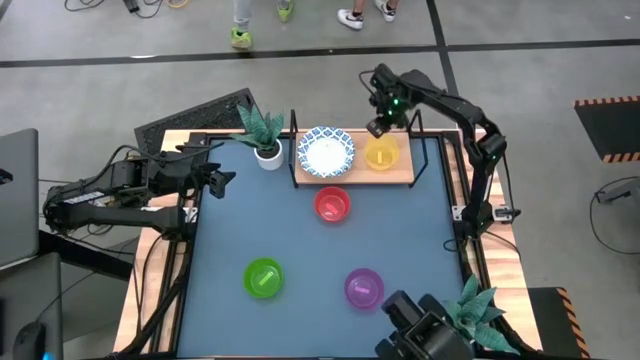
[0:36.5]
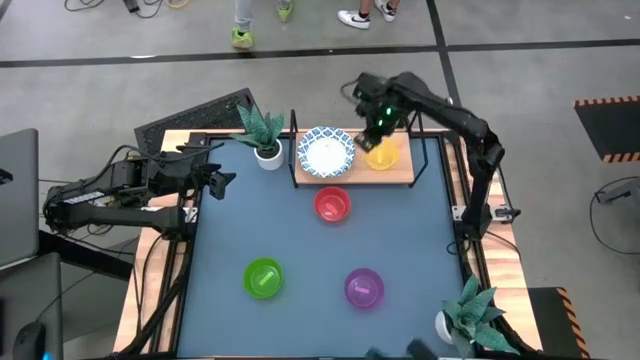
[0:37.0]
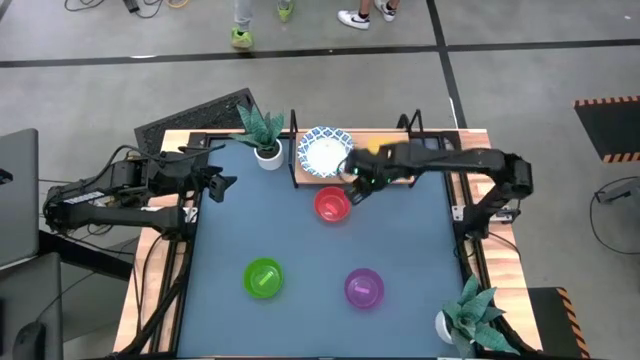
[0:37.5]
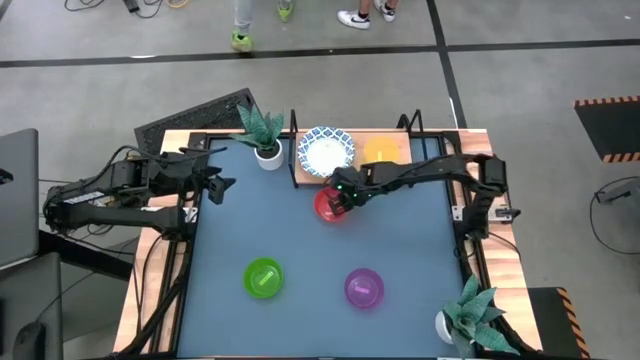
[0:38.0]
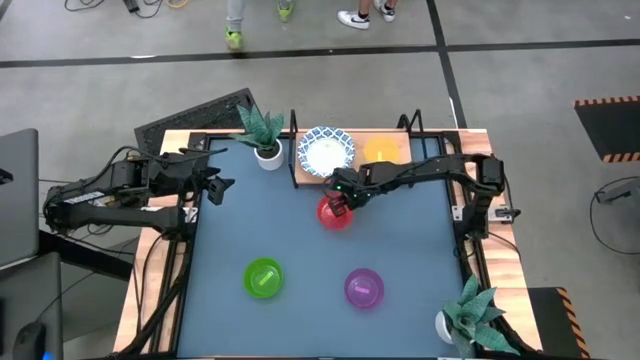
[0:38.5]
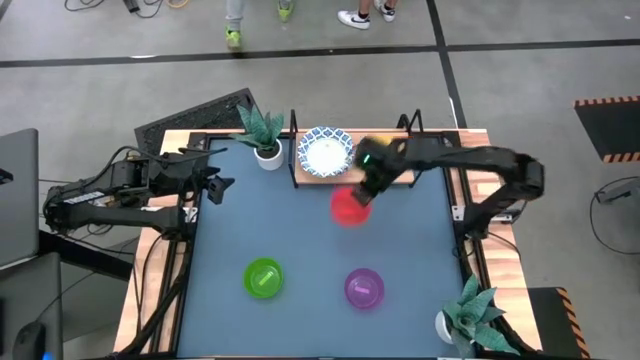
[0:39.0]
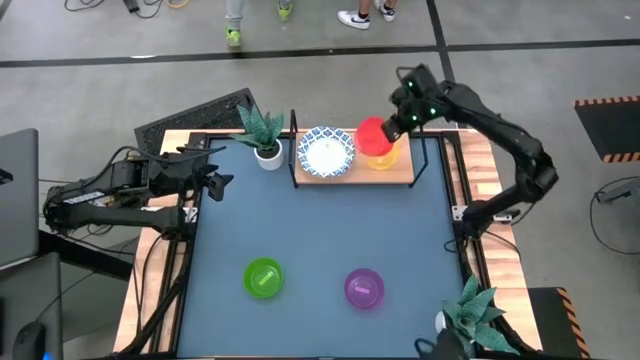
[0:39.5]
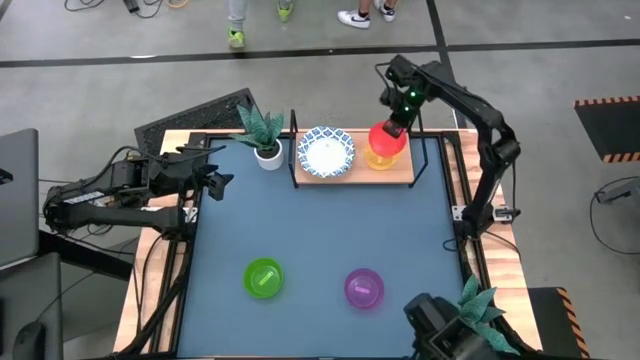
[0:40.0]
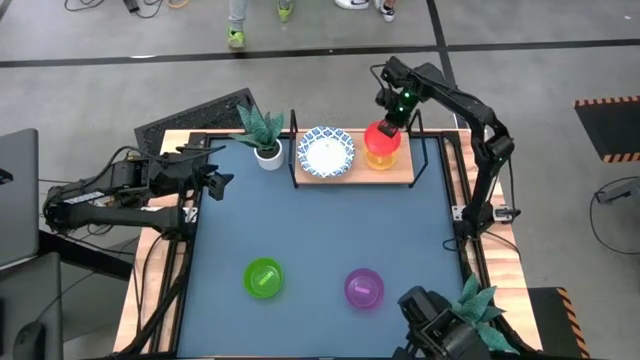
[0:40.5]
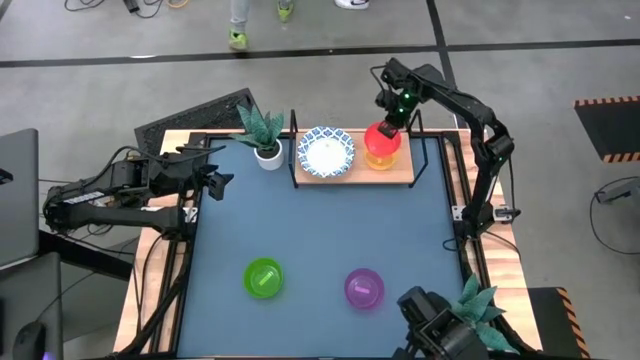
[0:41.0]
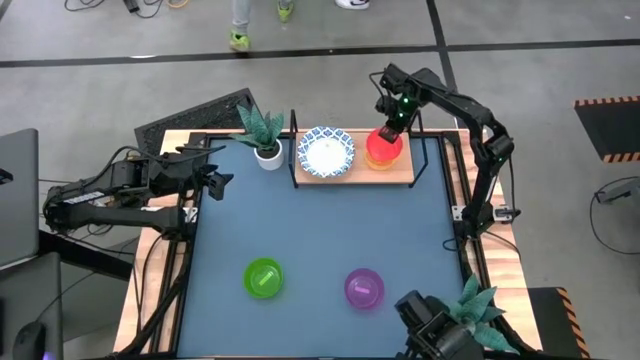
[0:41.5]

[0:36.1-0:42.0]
Task: Place and stack bowls onto a shelf
Stack the orange bowl on top of the yellow bowl on the shelf

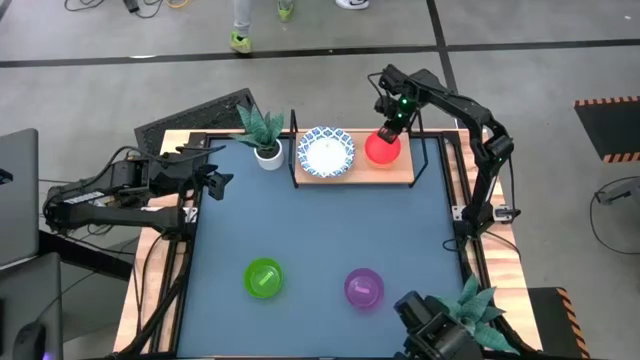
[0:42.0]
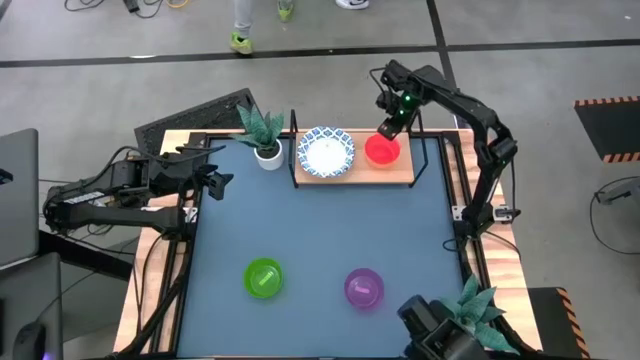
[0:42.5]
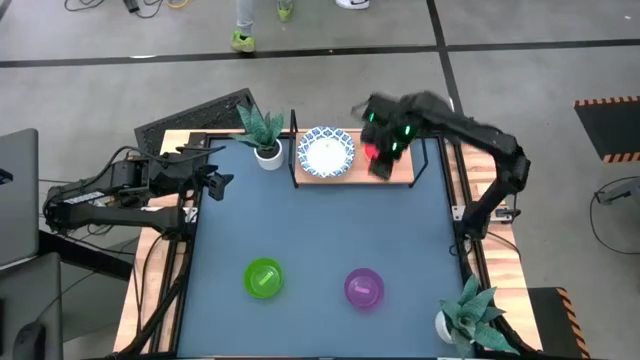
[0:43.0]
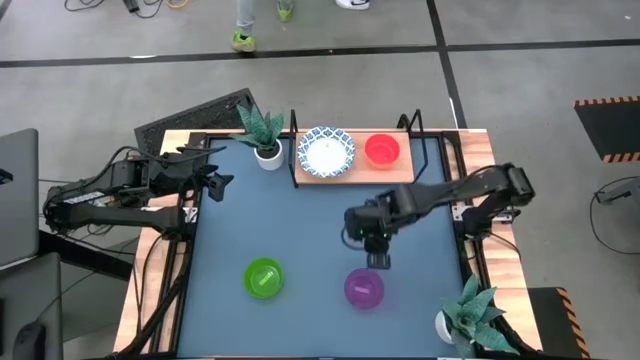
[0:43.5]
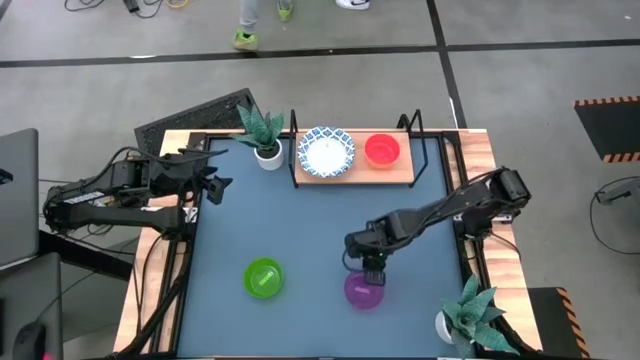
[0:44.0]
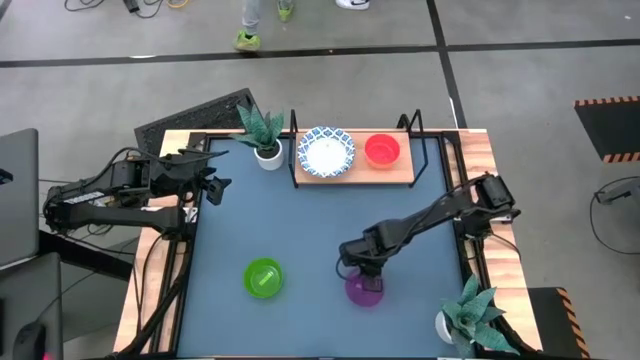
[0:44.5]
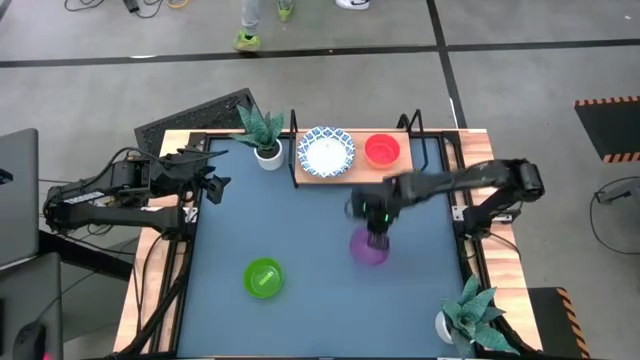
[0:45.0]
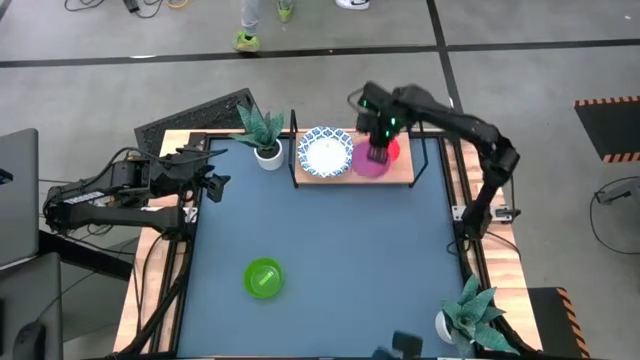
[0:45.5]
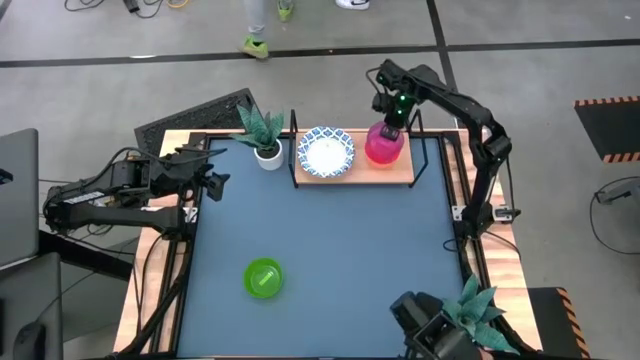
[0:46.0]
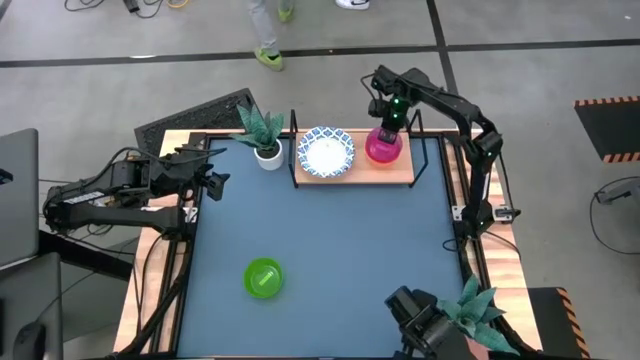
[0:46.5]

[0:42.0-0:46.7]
Stack the purple bowl on top of the orange bowl on the shelf

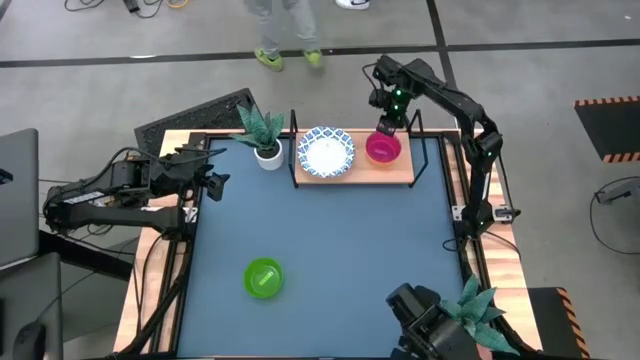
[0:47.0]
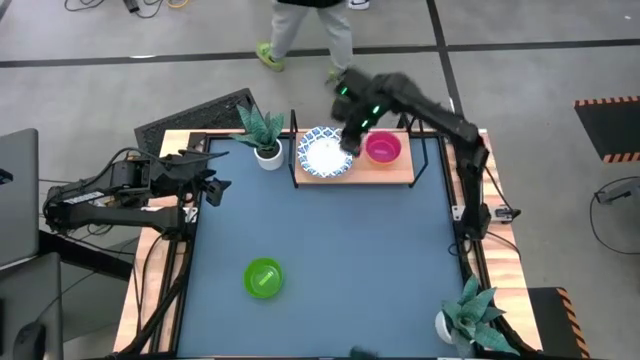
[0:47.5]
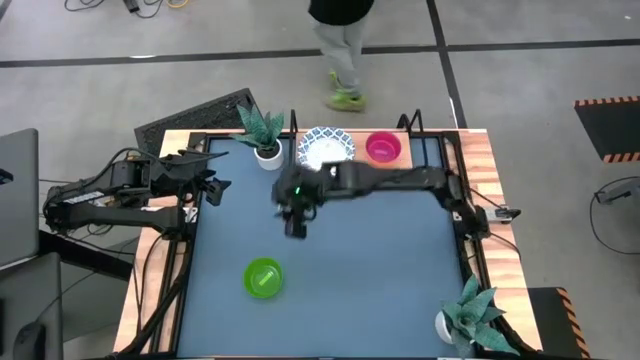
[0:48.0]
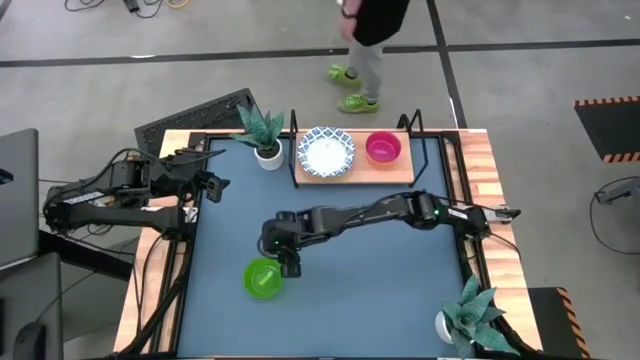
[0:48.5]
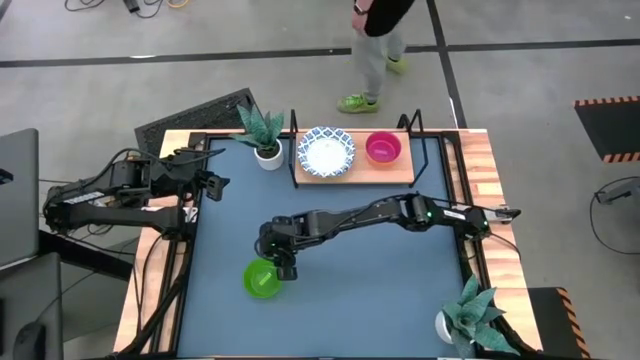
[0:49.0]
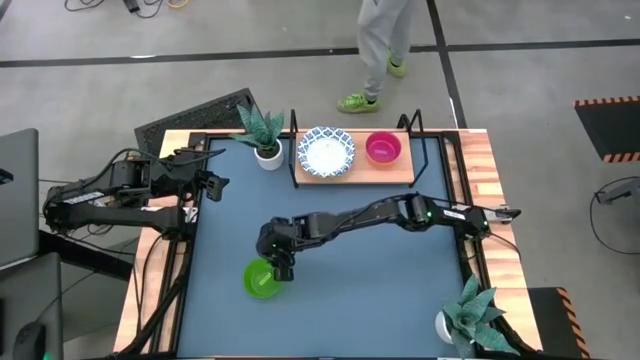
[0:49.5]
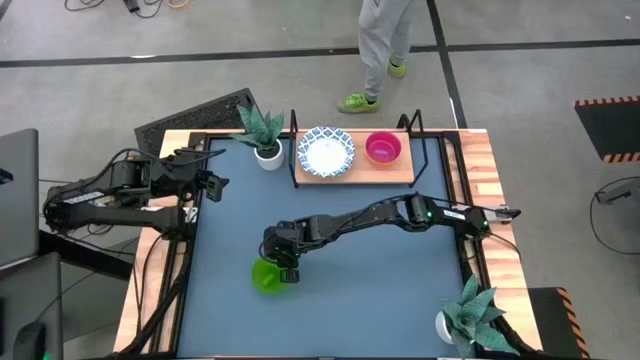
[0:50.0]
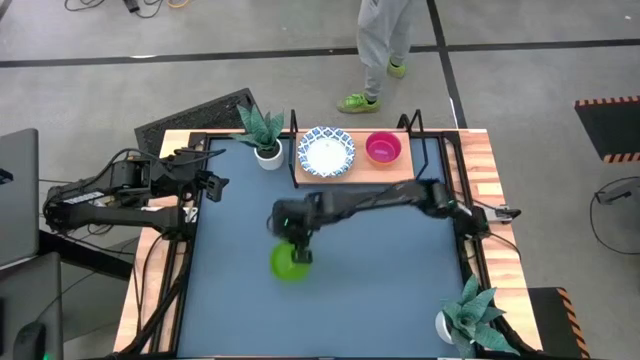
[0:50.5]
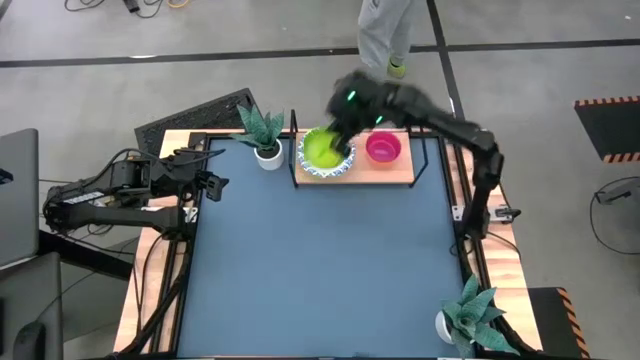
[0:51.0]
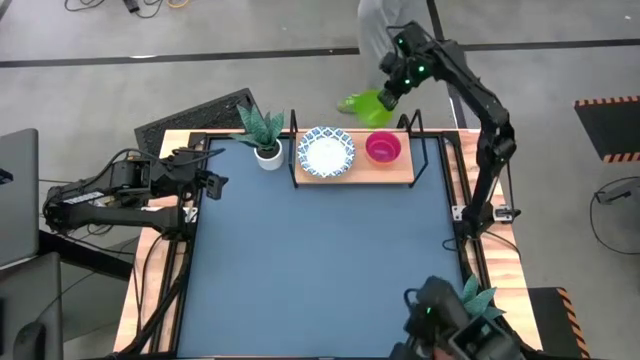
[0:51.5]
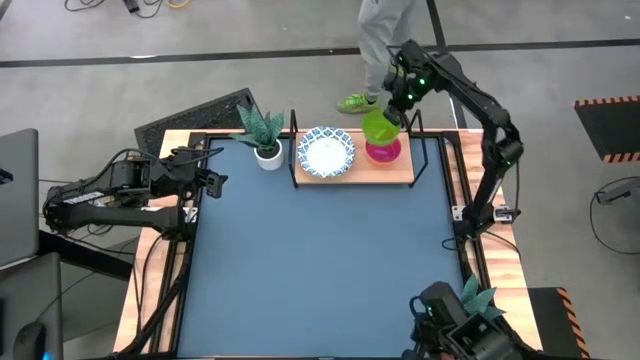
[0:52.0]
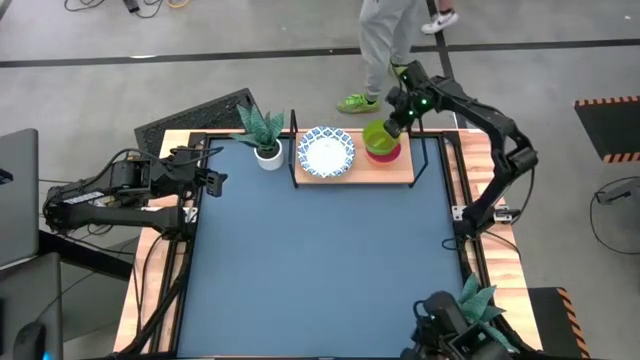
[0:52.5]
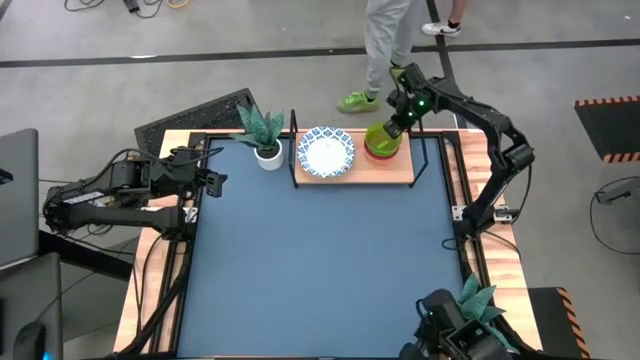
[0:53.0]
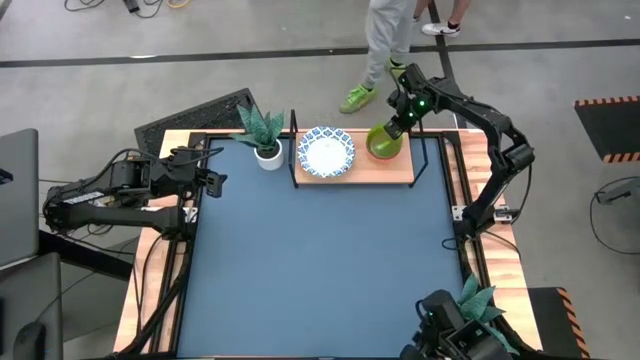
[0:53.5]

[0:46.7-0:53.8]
Stack the green bowl on top of the purple bowl on the shelf

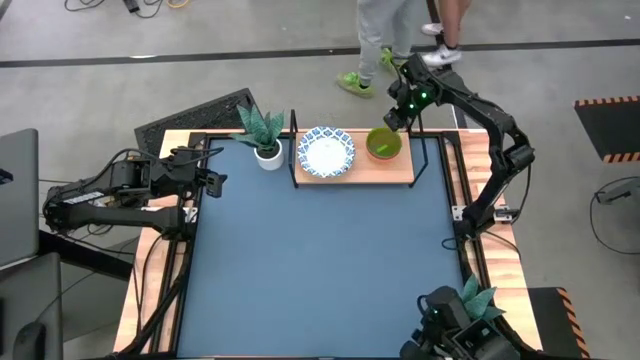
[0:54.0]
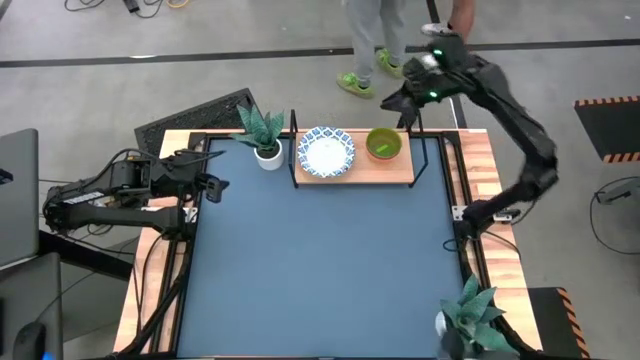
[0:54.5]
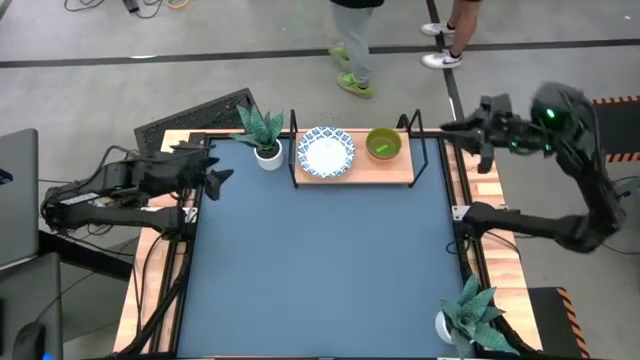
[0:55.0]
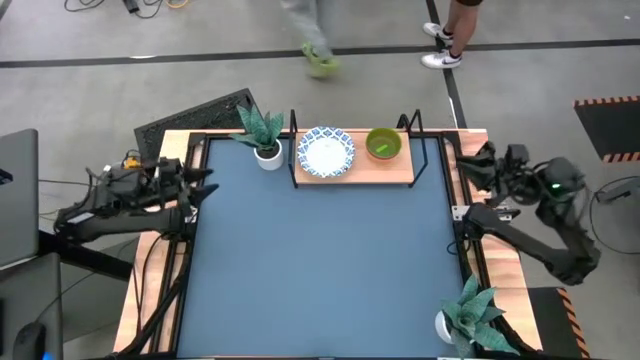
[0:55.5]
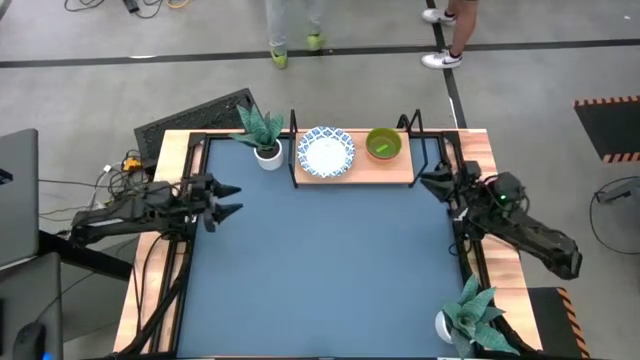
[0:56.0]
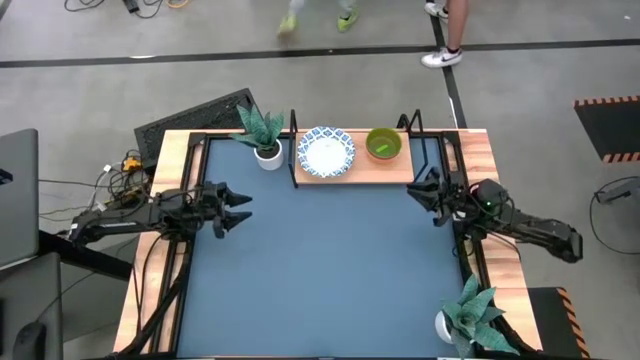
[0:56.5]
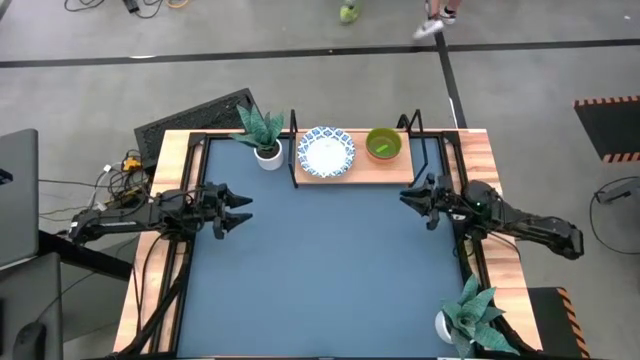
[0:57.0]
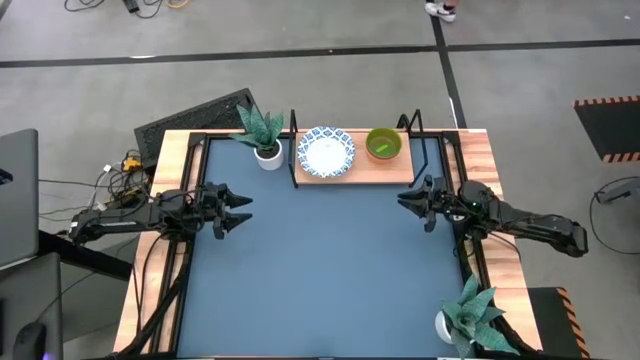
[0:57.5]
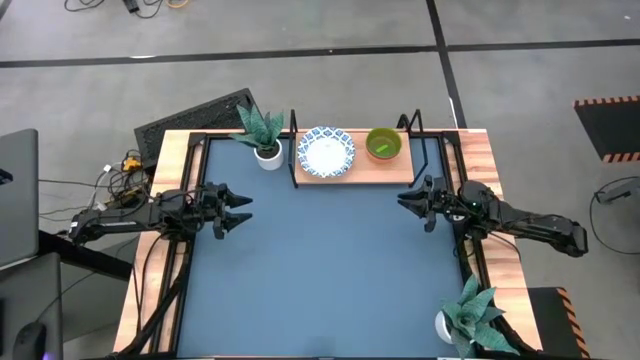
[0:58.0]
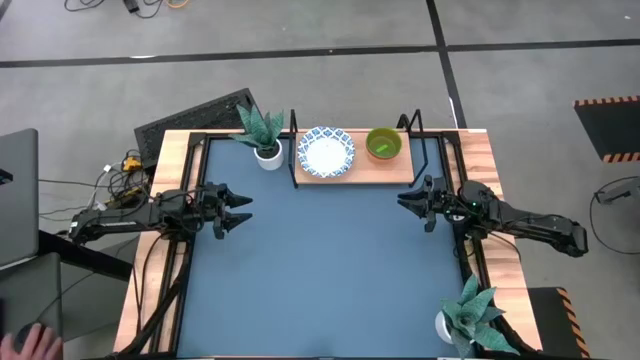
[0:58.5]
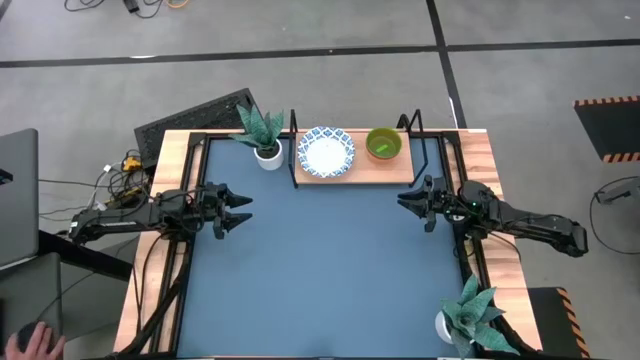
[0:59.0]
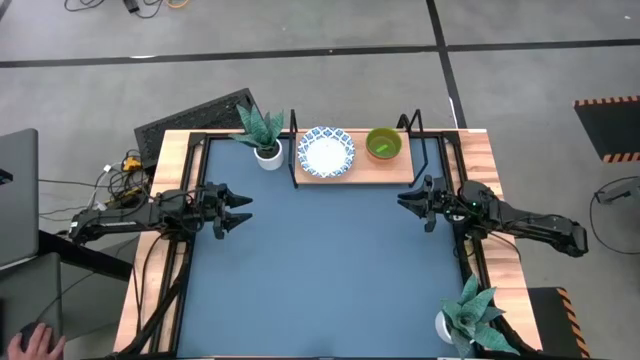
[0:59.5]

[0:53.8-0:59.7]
Return to Home Position
